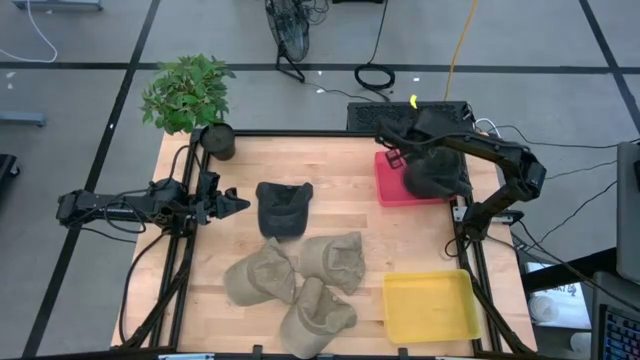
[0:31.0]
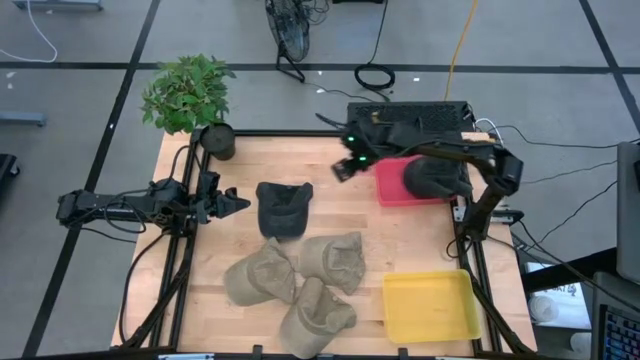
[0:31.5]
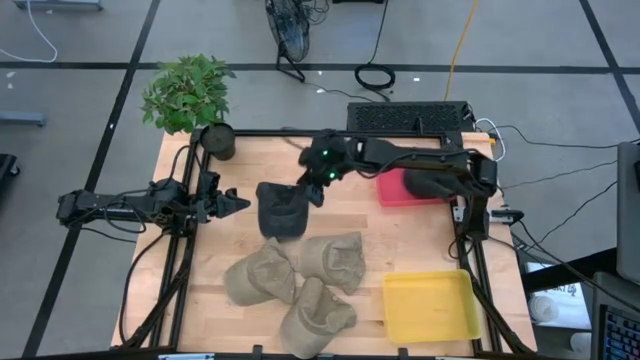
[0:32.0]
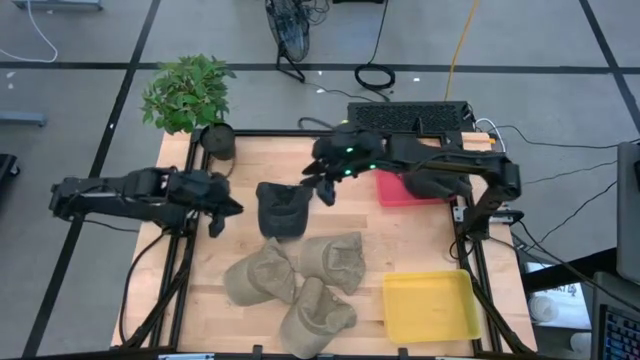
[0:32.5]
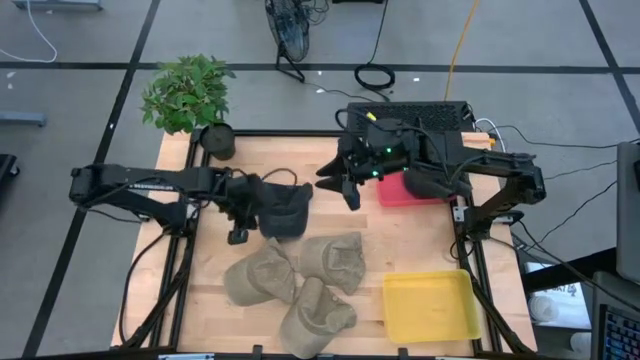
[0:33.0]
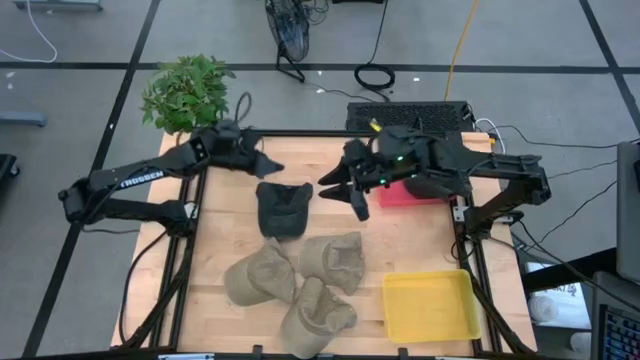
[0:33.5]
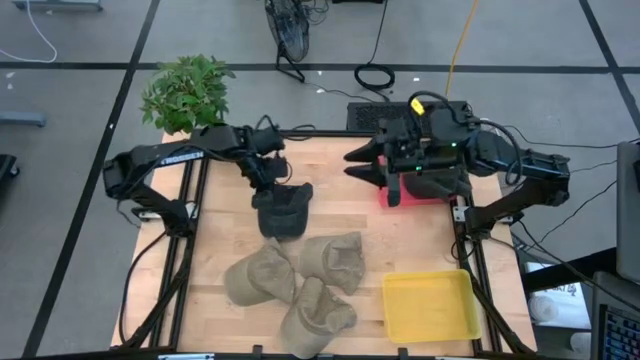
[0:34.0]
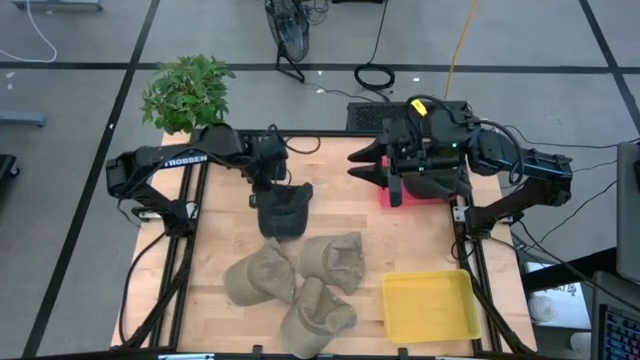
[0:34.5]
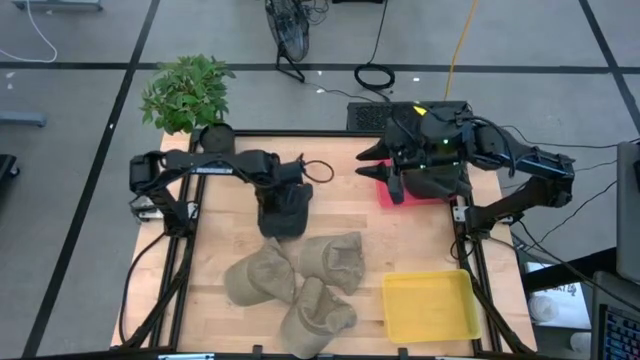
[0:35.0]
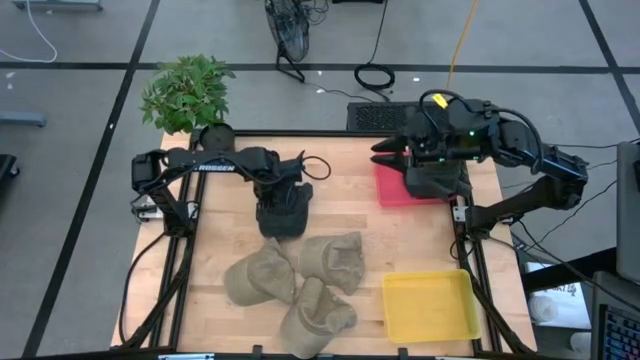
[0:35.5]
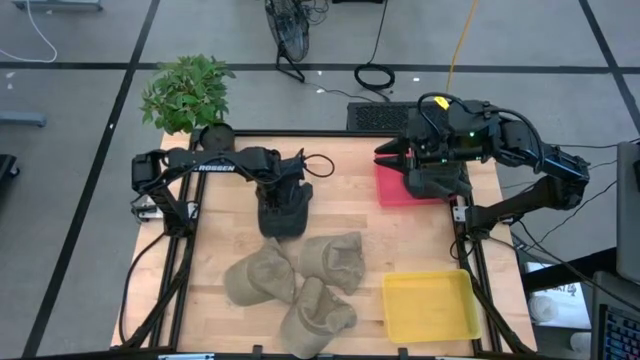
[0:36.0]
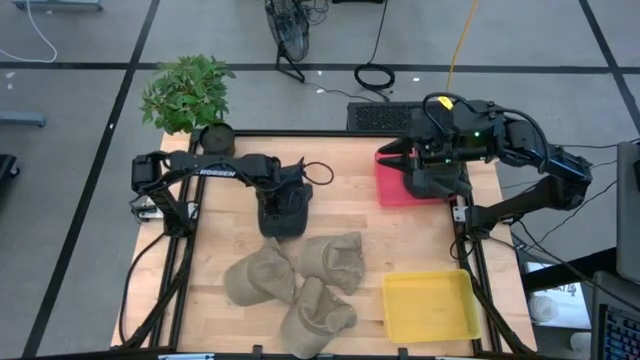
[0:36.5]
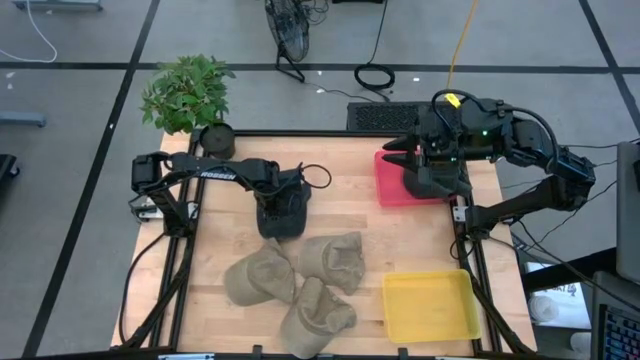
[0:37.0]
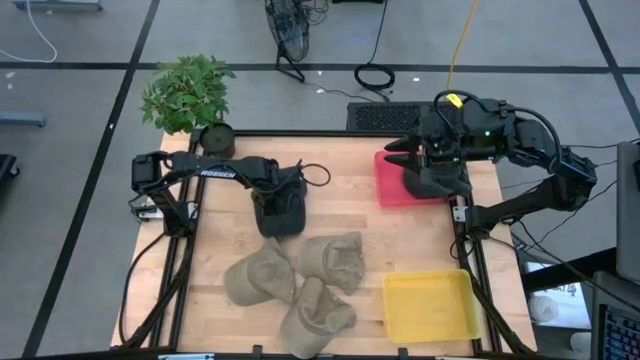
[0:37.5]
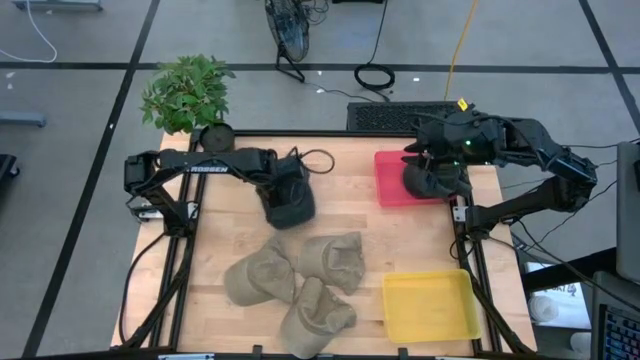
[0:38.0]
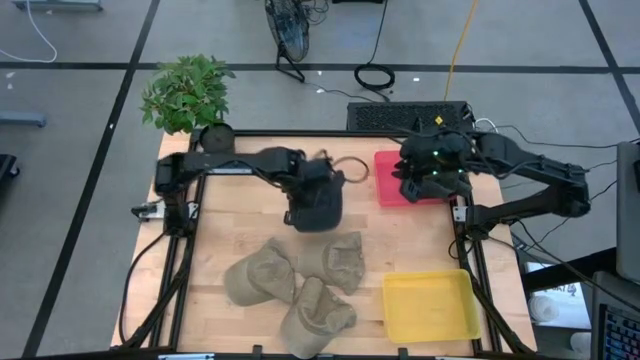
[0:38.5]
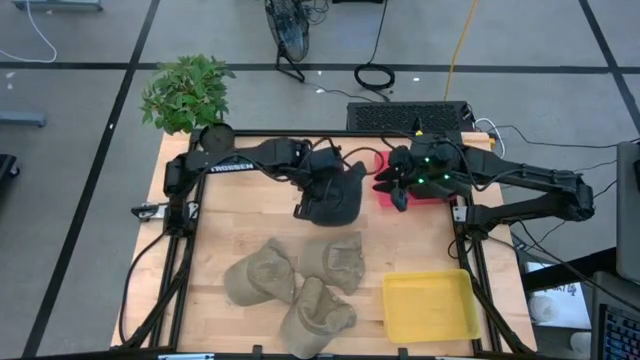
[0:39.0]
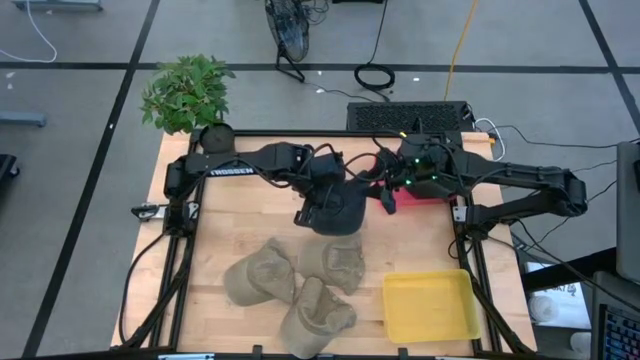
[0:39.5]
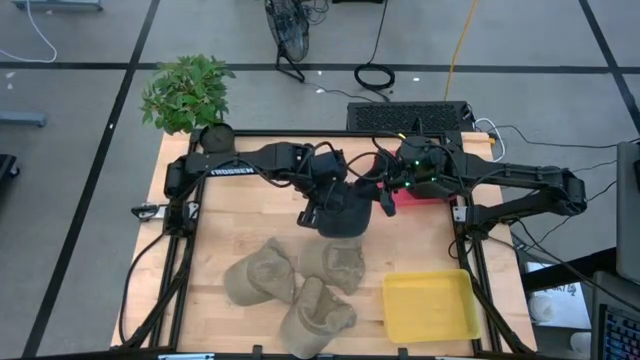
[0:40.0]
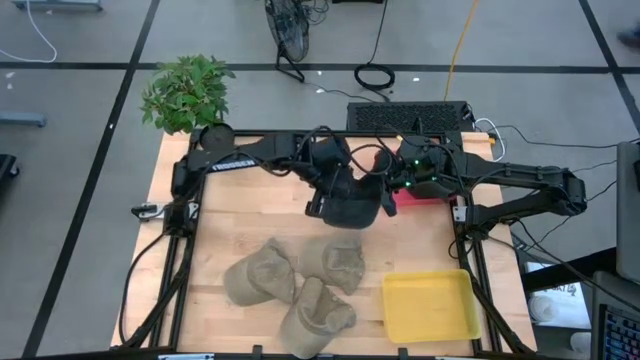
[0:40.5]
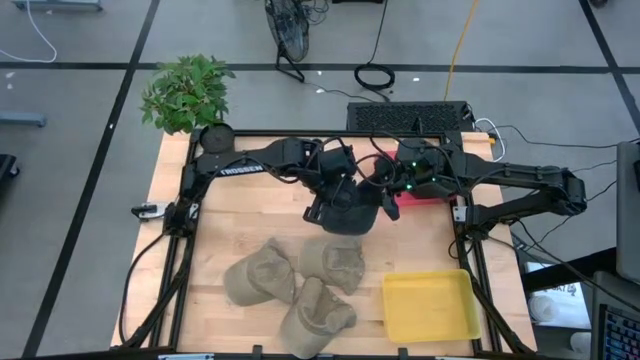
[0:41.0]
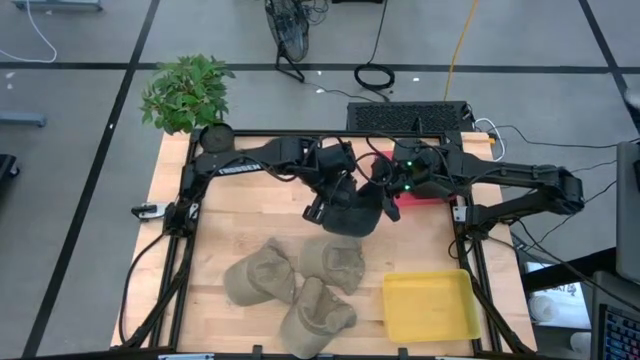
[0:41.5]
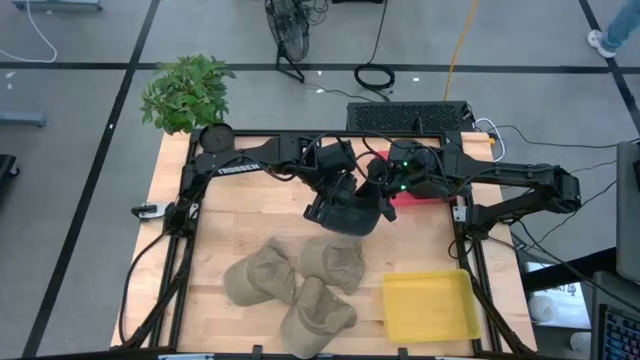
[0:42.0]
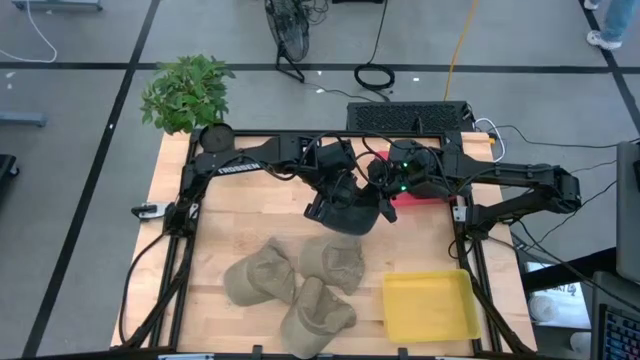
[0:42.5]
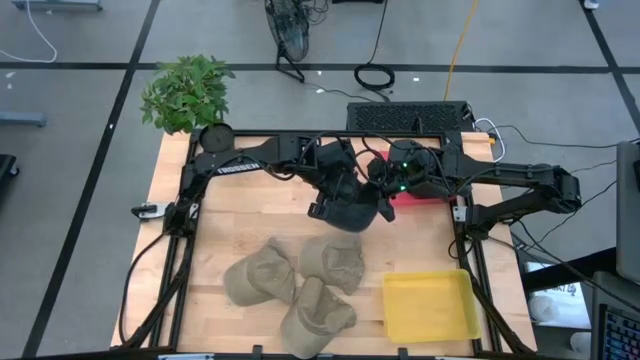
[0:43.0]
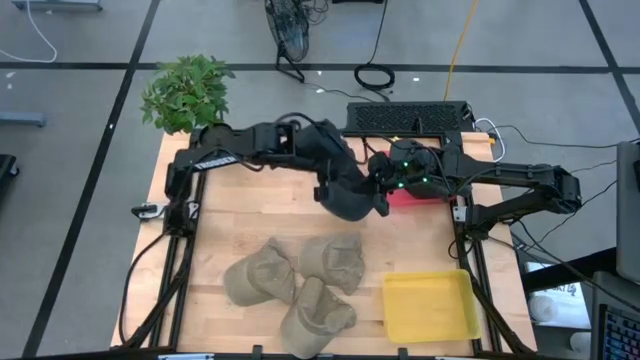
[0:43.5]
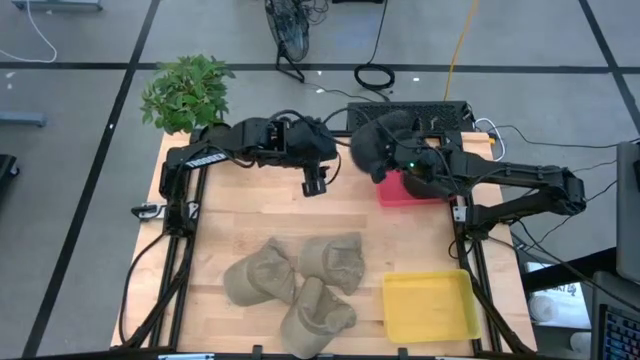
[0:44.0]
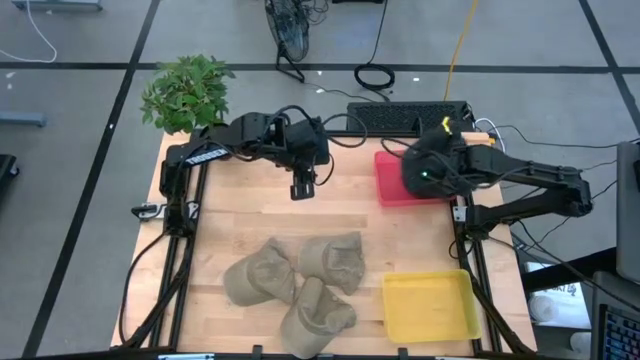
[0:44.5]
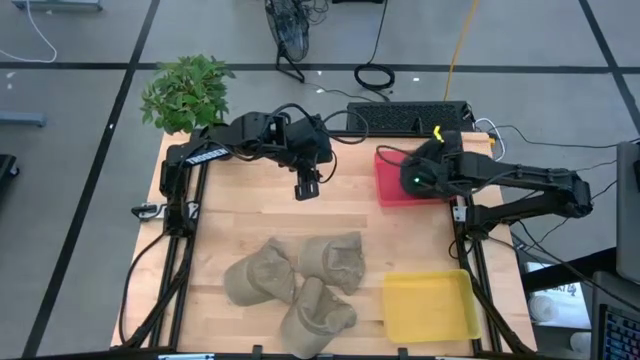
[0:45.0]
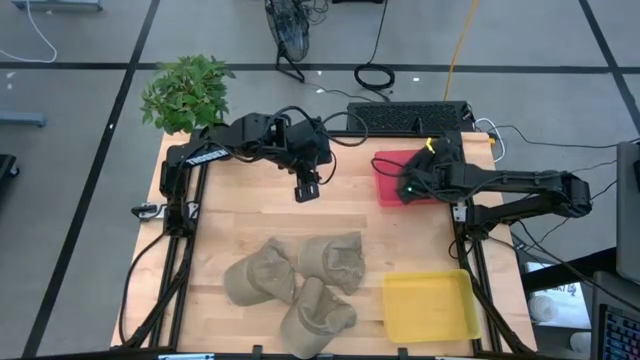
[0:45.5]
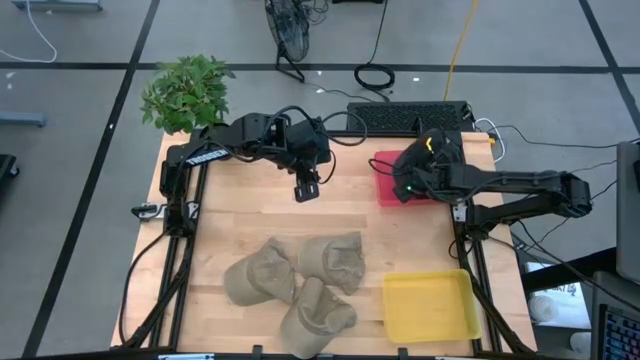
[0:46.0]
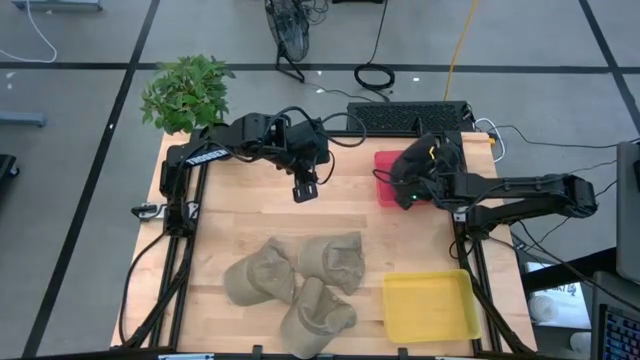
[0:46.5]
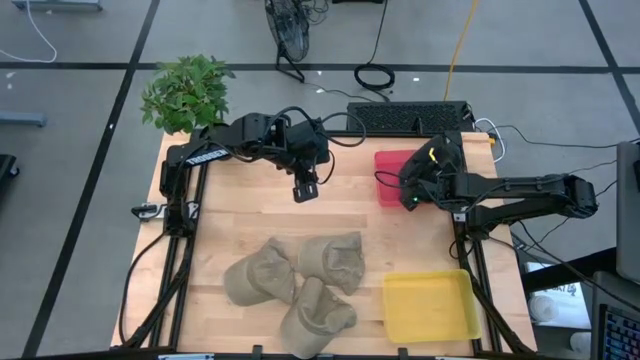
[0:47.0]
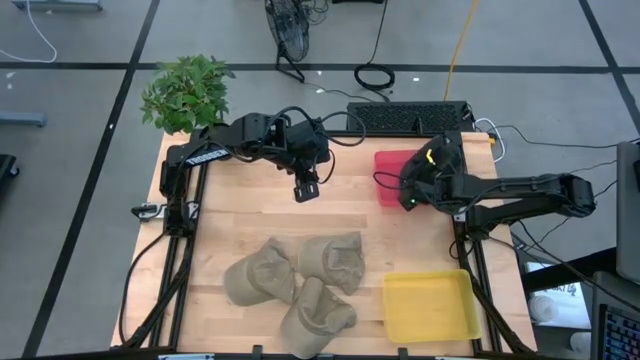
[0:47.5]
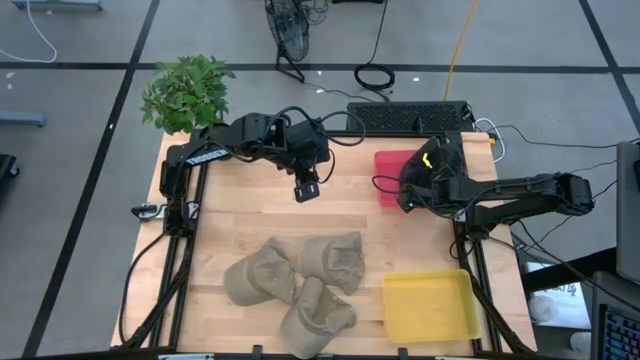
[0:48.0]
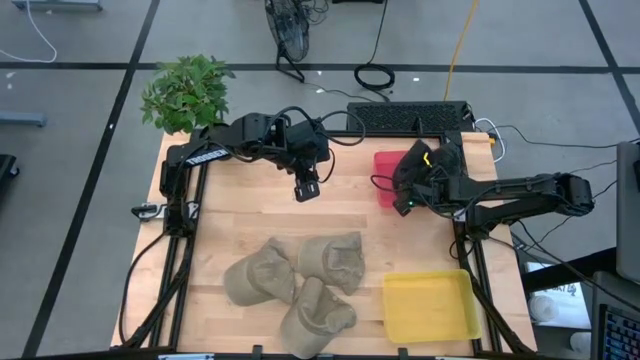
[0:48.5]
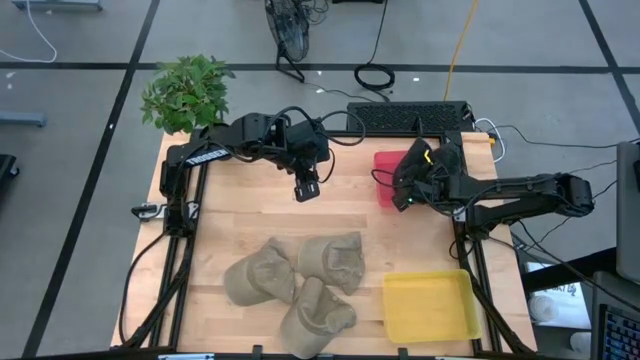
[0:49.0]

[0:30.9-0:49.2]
Task: Pick & Place hat
Put the black cap into the red bin

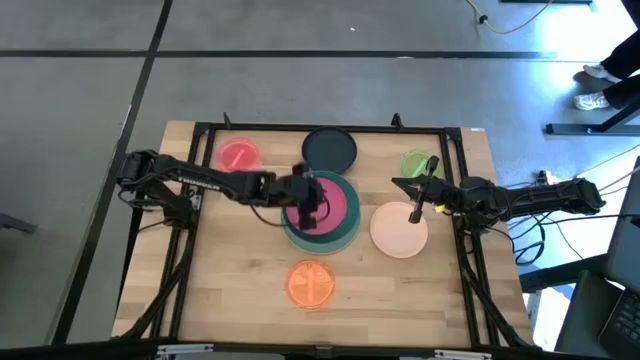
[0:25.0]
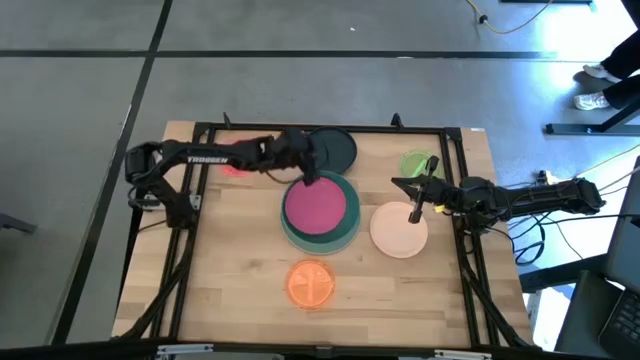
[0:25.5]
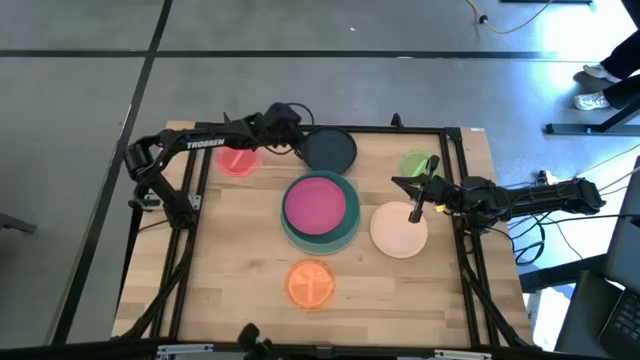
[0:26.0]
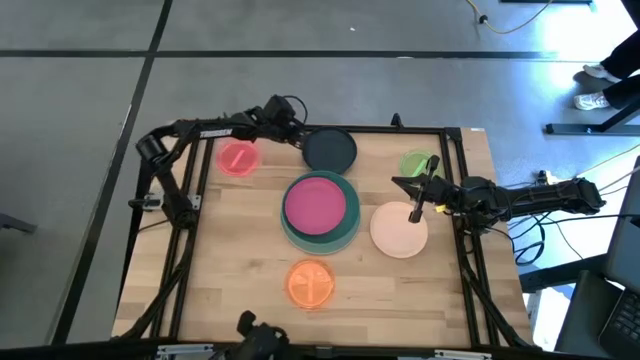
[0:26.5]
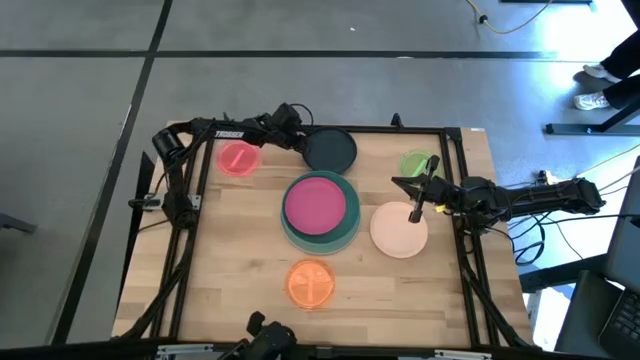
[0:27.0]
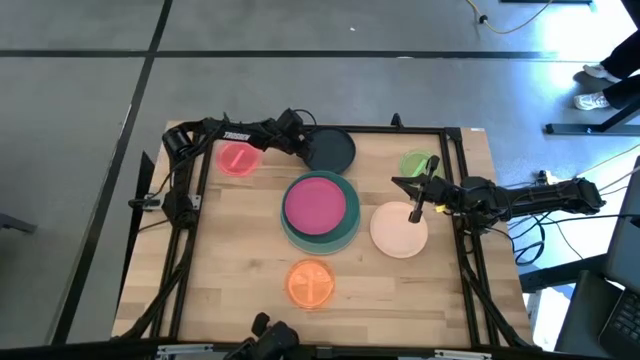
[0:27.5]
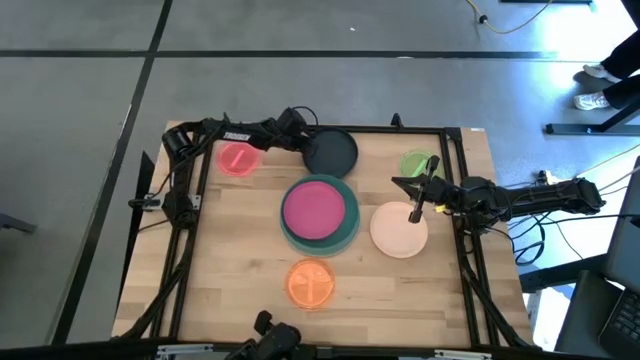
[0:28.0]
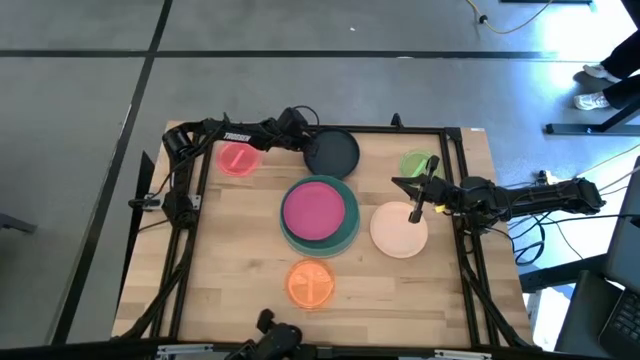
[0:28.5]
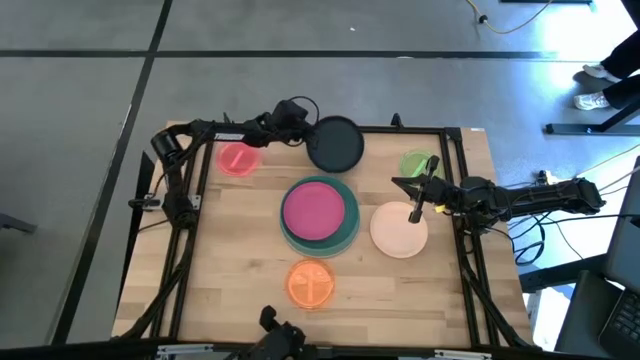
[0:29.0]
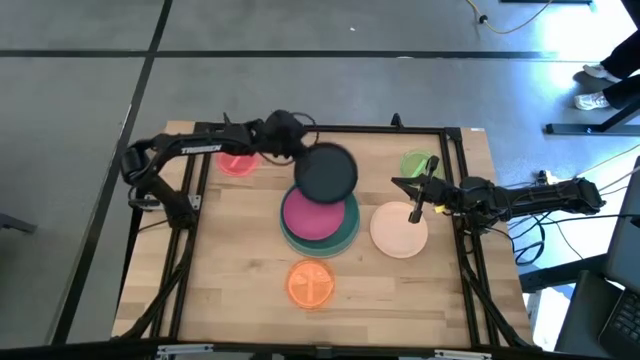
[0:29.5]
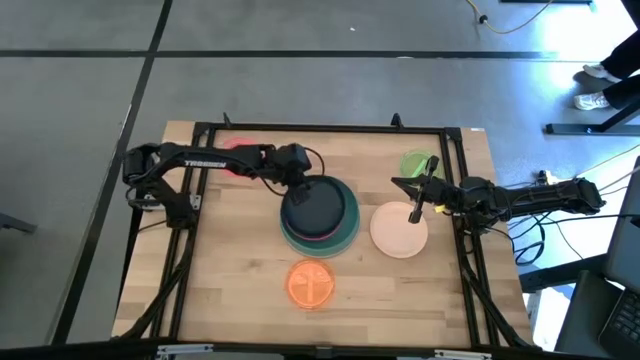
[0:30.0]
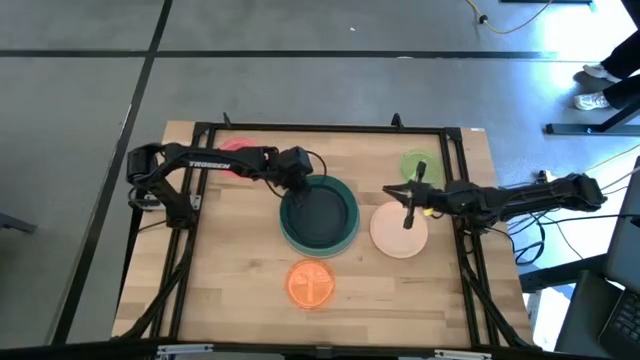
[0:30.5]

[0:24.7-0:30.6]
Task: Stack plastic plates
Stack the black plate on the pink plate
